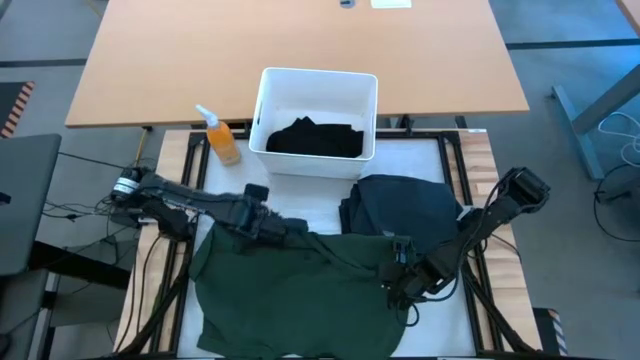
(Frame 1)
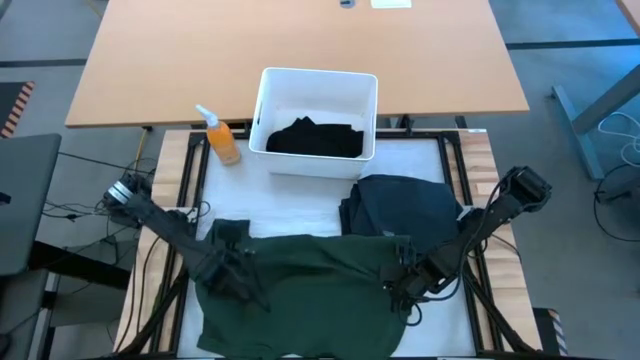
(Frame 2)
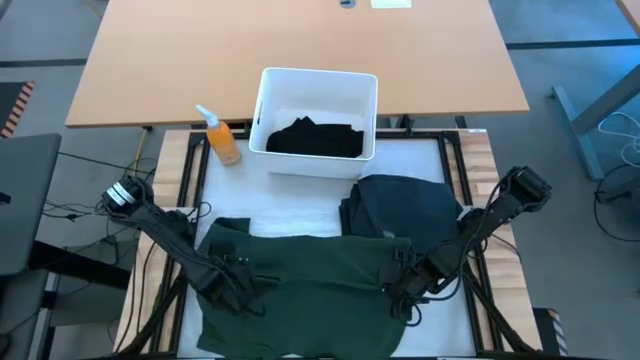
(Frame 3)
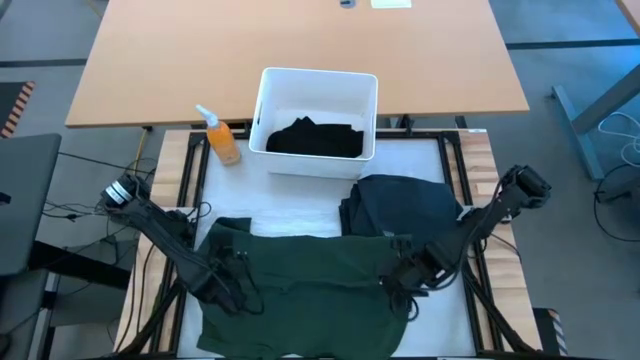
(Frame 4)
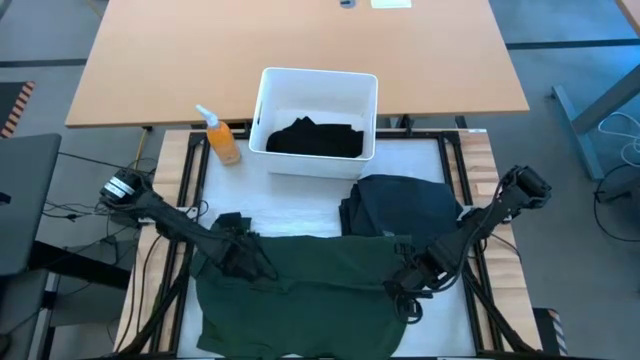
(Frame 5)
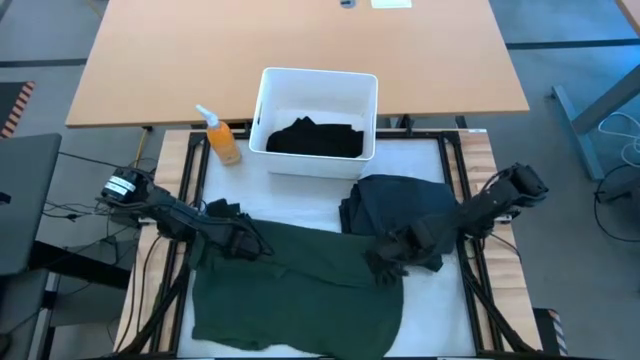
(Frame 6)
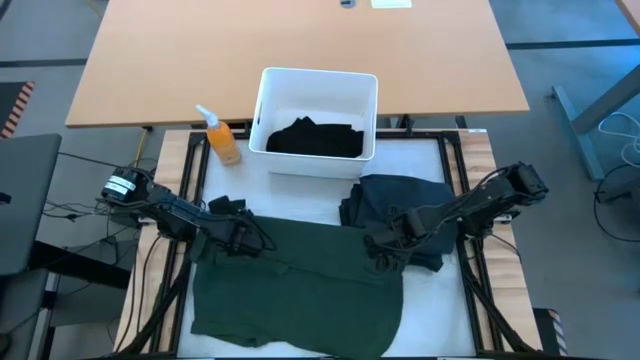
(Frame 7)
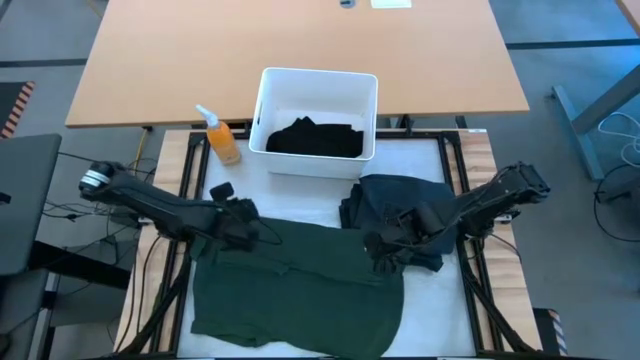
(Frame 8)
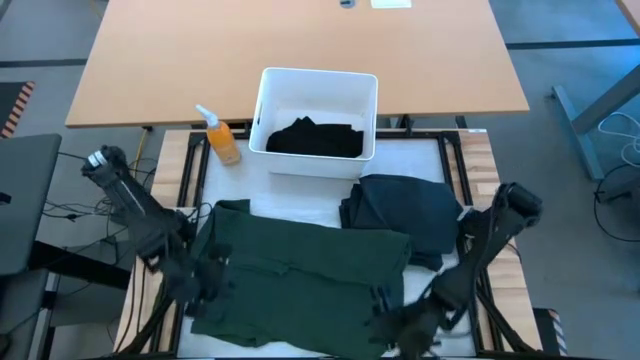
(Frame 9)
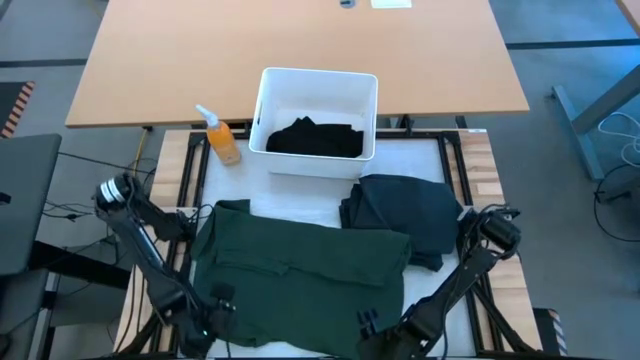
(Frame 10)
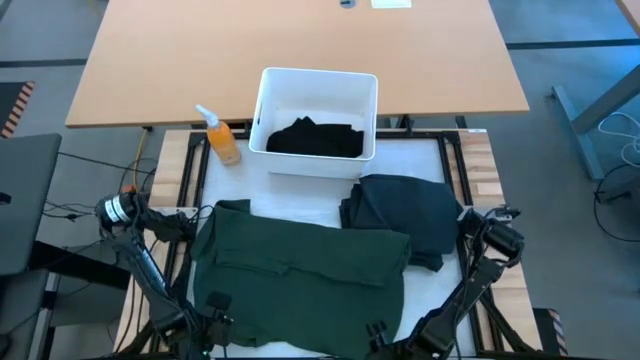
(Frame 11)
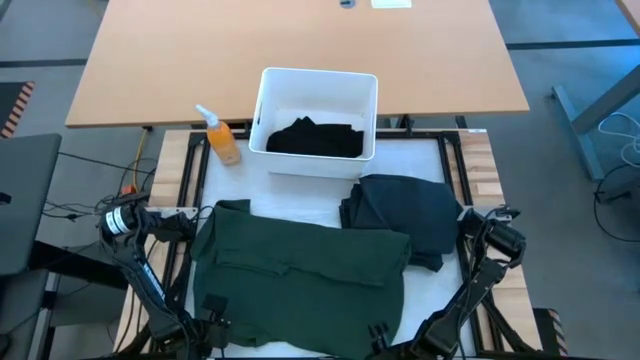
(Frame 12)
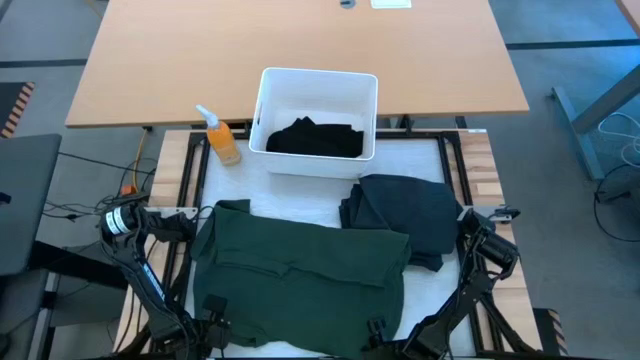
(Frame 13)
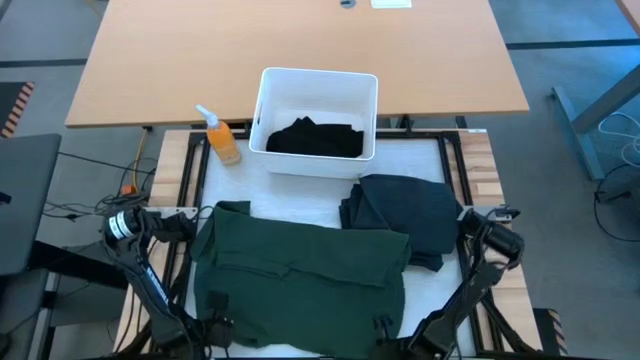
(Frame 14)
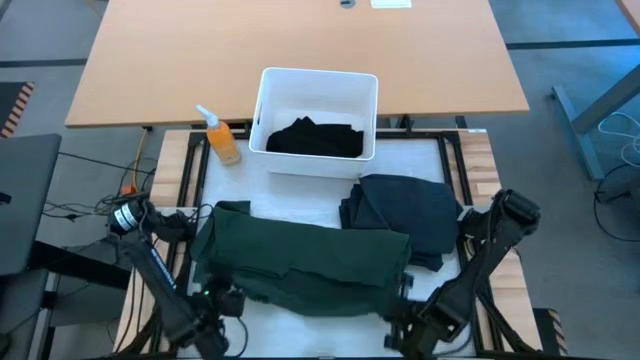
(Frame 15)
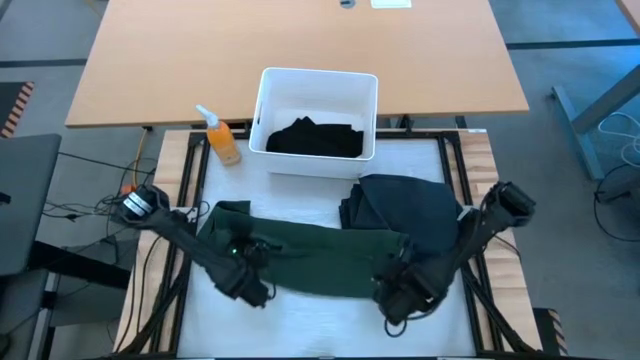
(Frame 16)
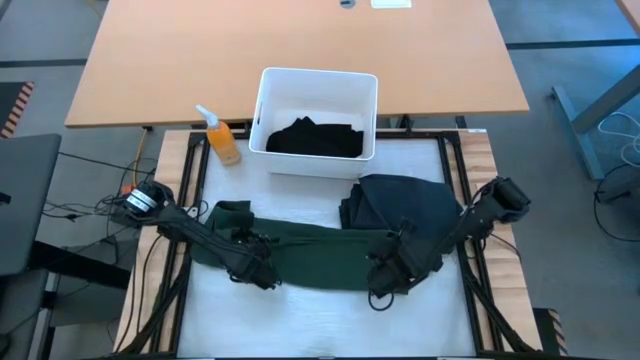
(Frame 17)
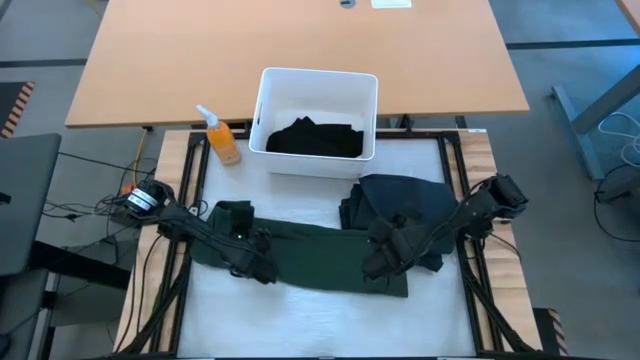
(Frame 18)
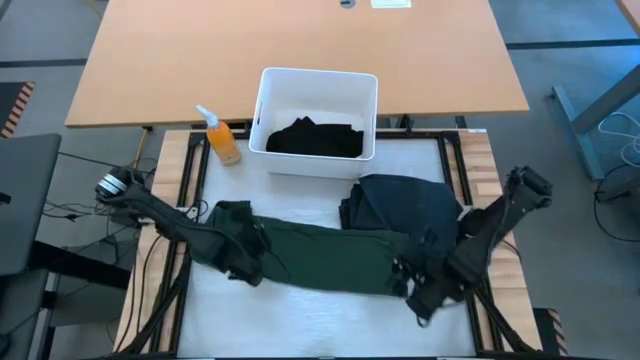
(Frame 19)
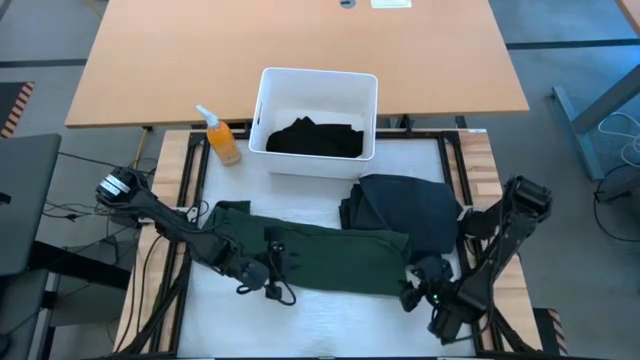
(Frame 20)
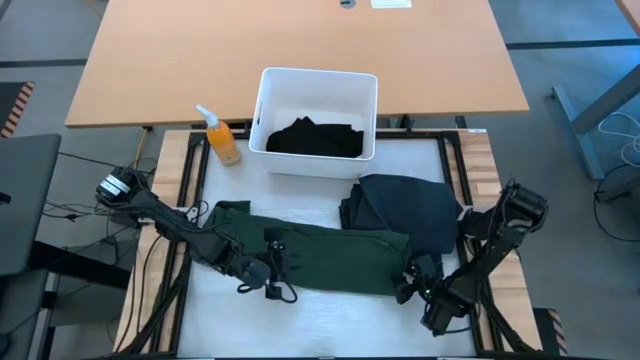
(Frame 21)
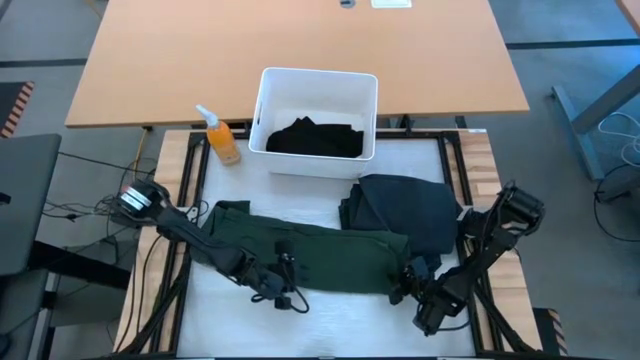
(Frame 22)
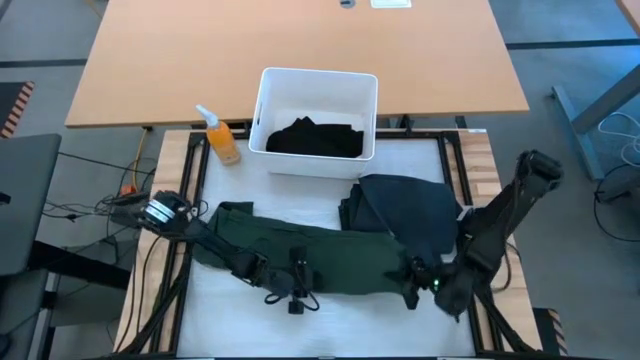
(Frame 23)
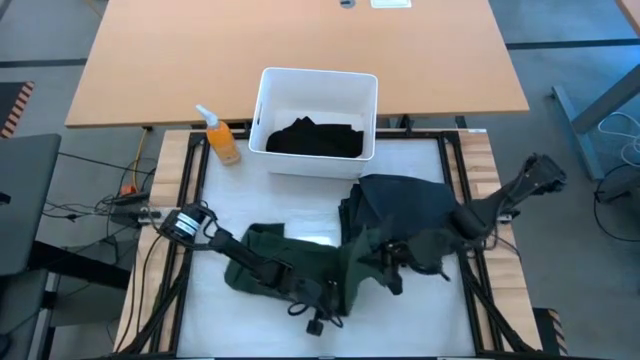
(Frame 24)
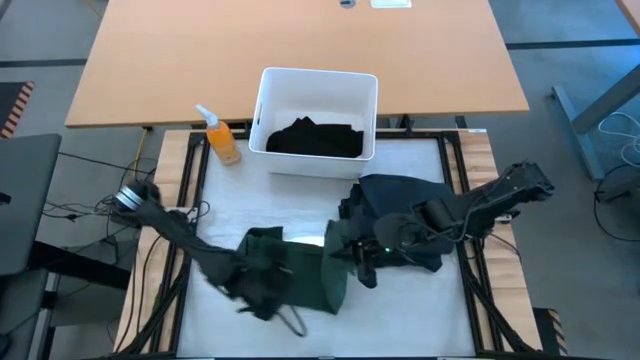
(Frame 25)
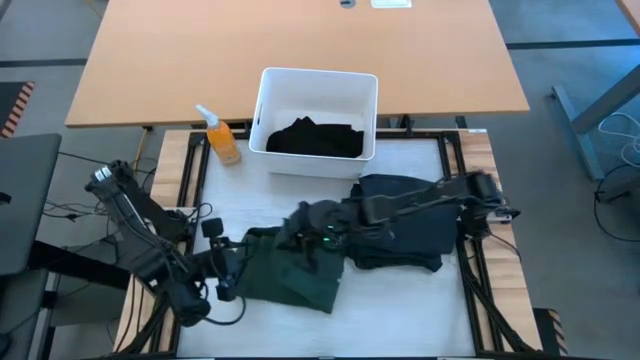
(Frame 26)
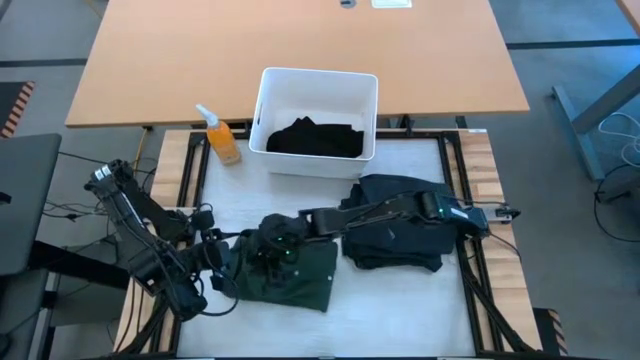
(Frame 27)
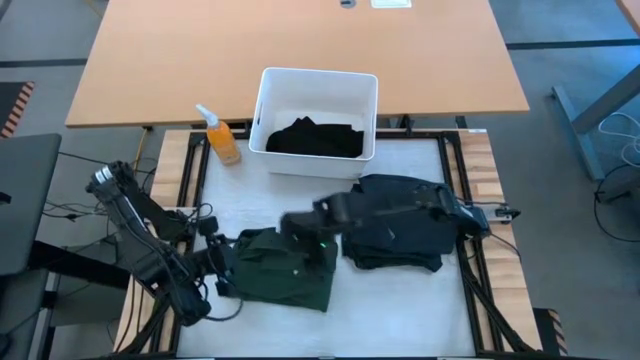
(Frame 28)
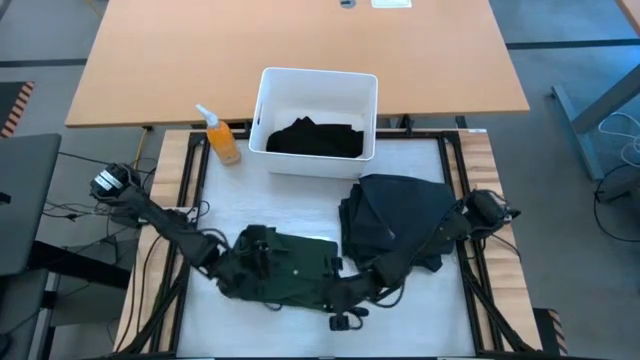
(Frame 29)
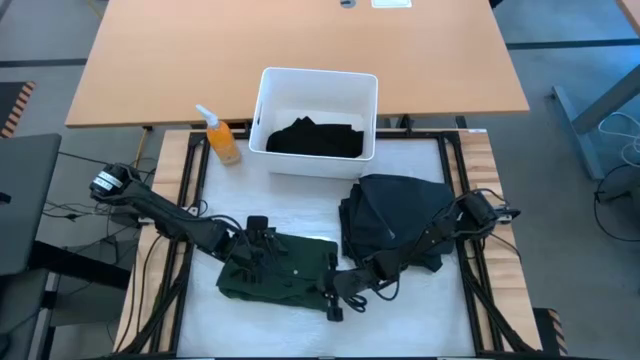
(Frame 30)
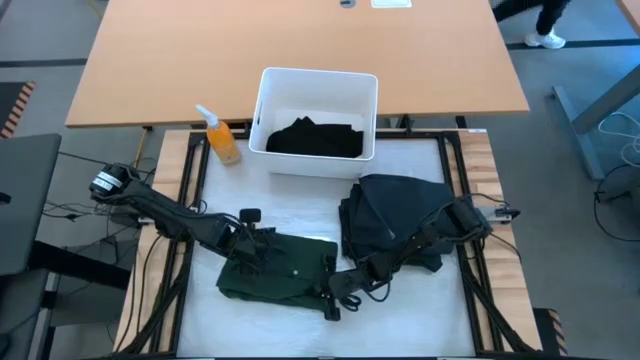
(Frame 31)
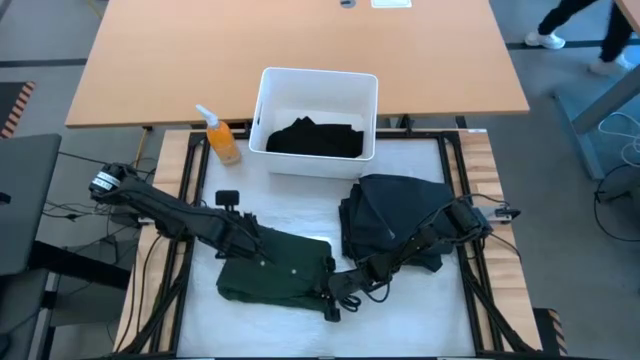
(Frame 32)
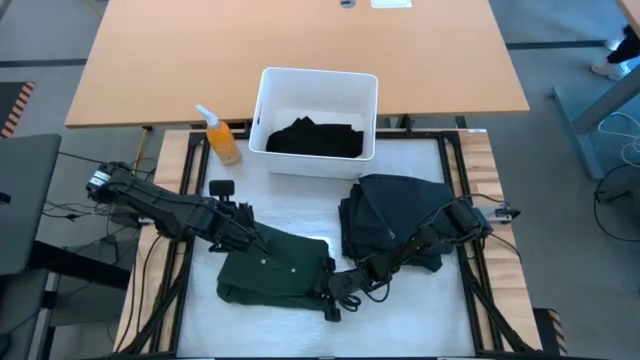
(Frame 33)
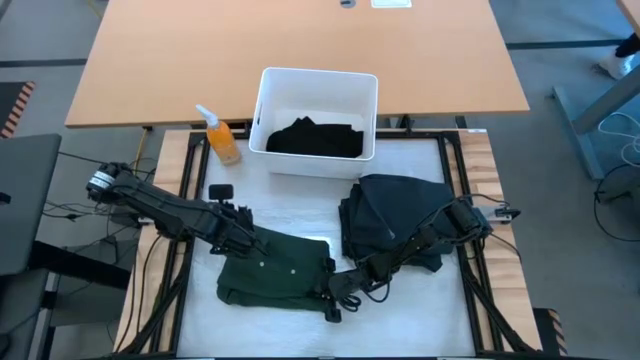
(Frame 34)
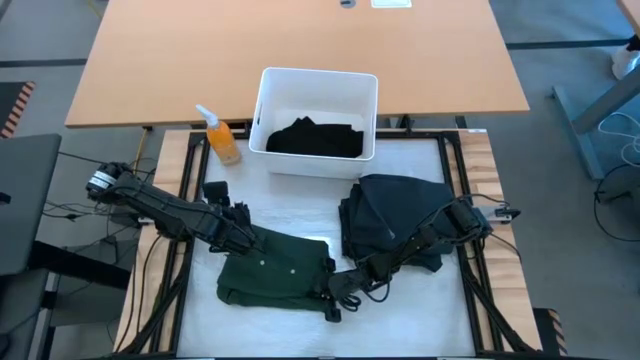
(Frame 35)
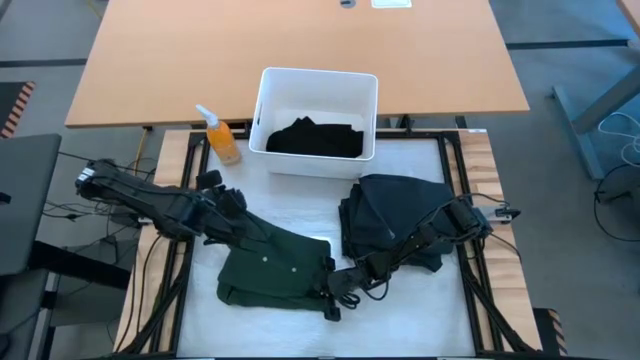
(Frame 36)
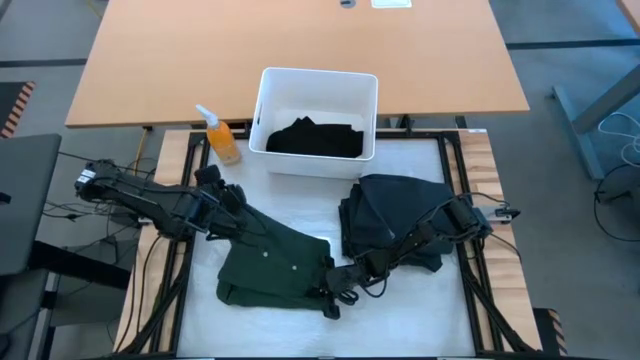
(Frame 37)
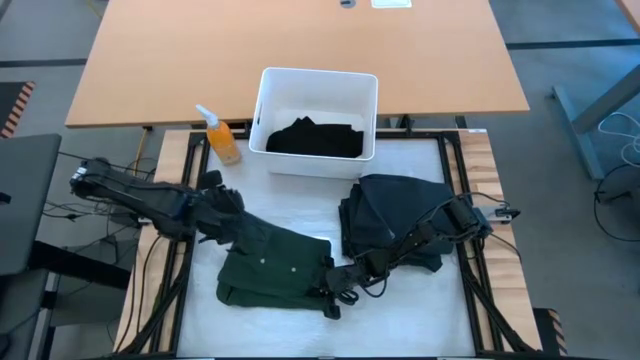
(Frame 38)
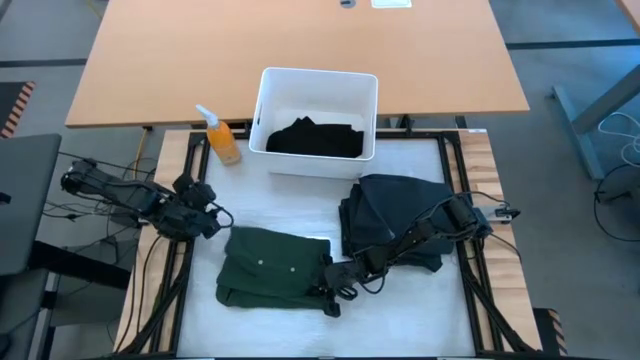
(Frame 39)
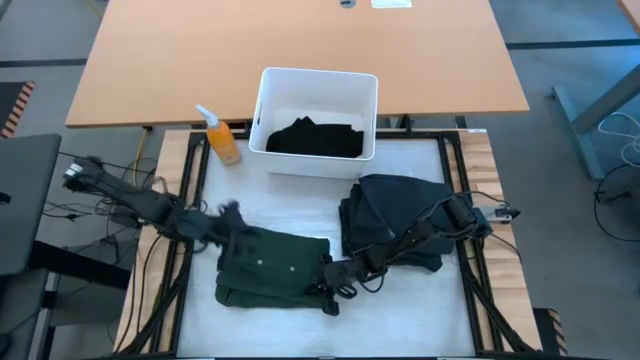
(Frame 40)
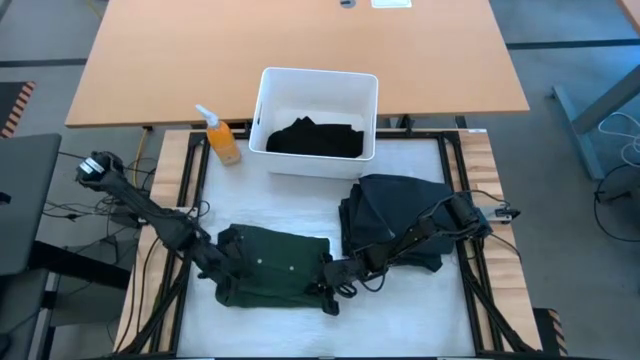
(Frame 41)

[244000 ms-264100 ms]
Task: Fold laundry
Fold the green polo shirt from the white laundry organizer

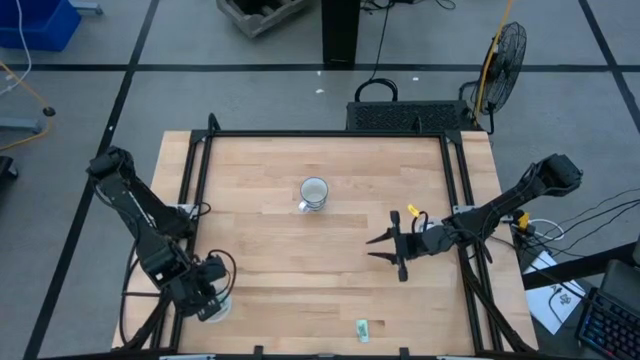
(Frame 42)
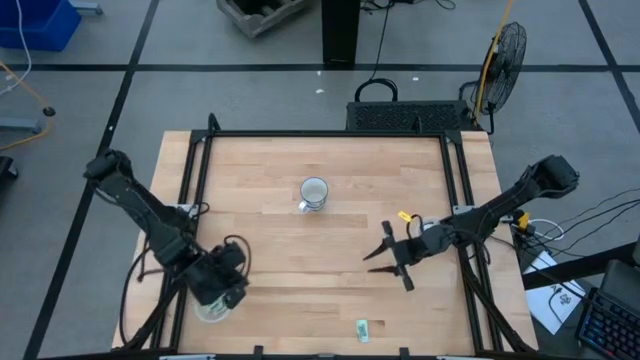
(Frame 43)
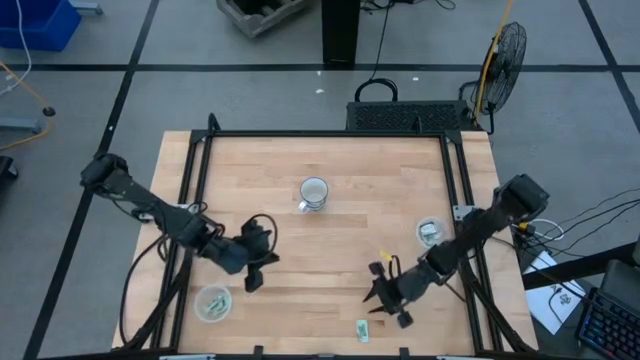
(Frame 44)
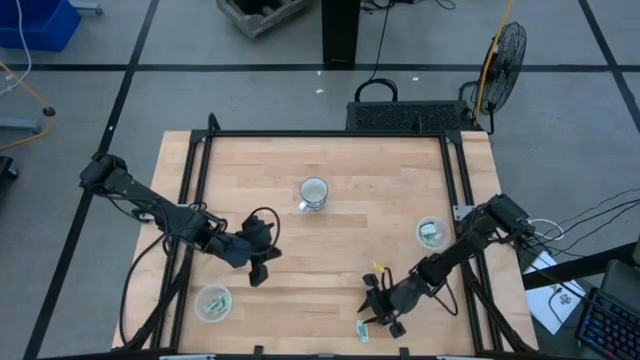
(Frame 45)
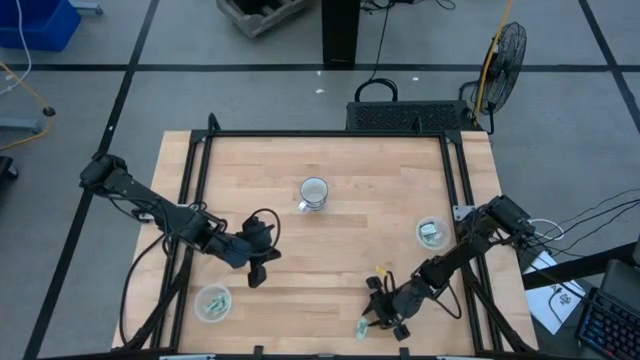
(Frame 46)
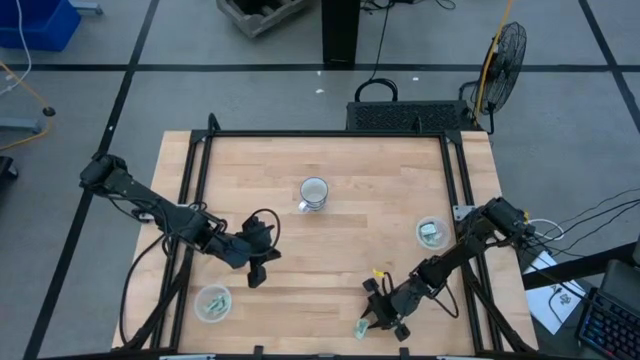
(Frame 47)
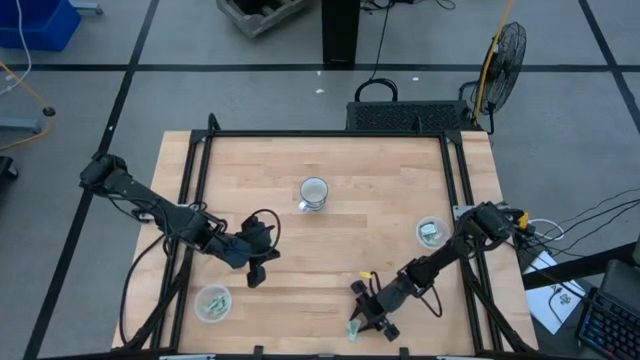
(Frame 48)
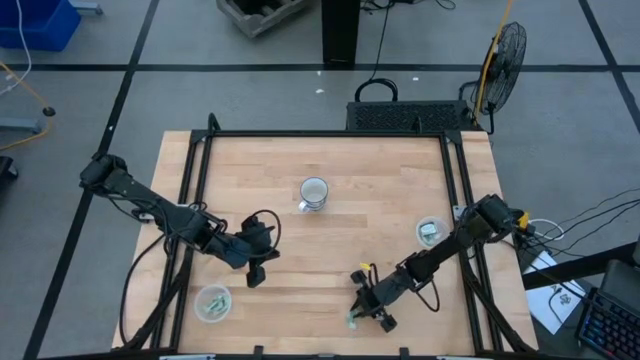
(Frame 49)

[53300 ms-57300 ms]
Task: Pick and place Stevia / Truvia into bins
Put the green stevia packet into the right transparent container
